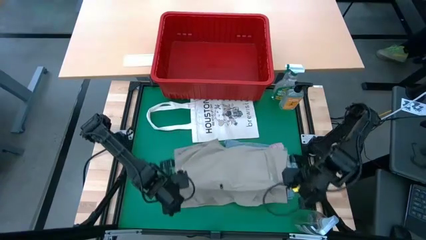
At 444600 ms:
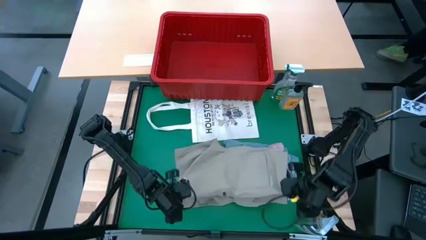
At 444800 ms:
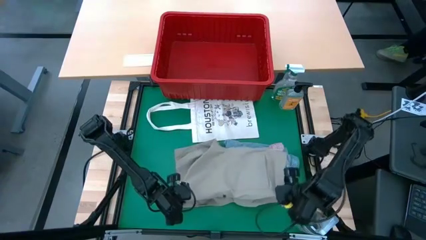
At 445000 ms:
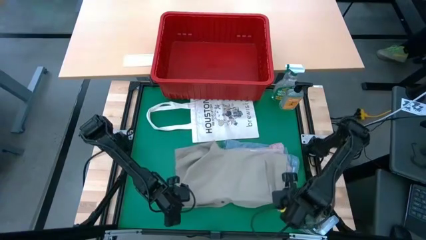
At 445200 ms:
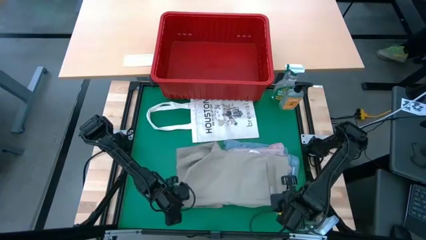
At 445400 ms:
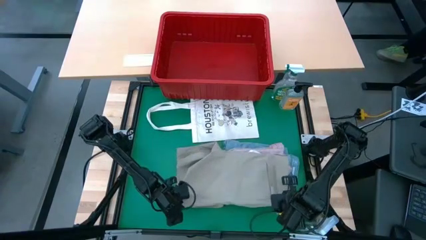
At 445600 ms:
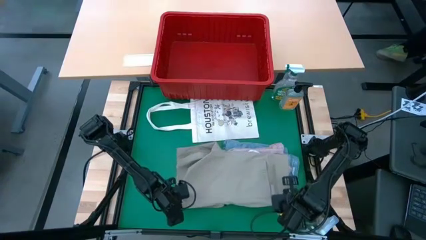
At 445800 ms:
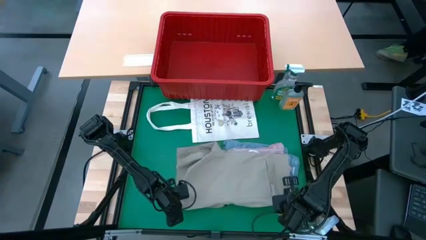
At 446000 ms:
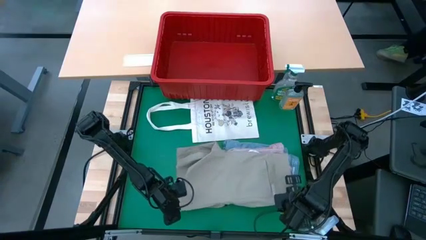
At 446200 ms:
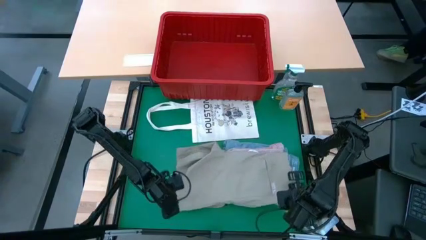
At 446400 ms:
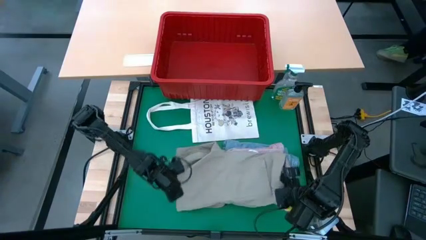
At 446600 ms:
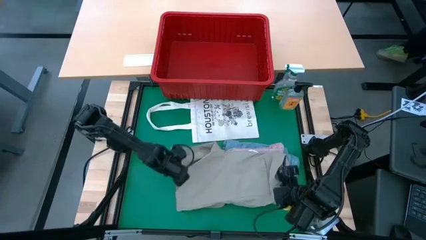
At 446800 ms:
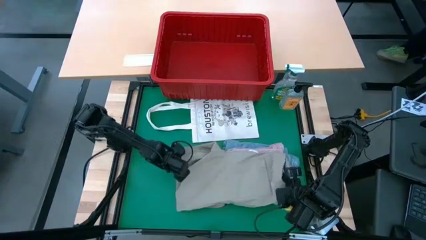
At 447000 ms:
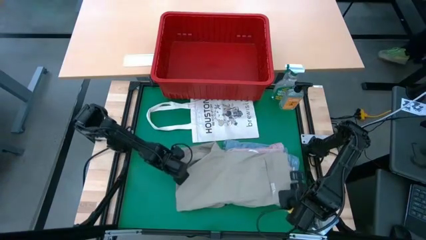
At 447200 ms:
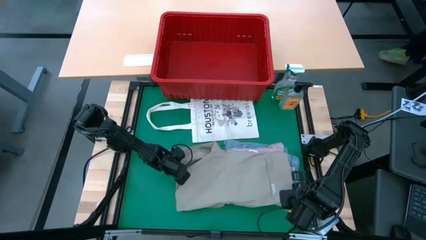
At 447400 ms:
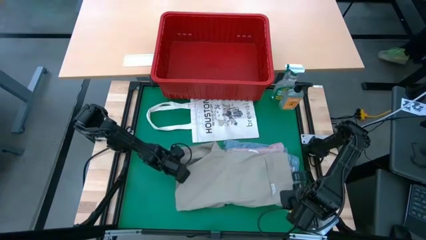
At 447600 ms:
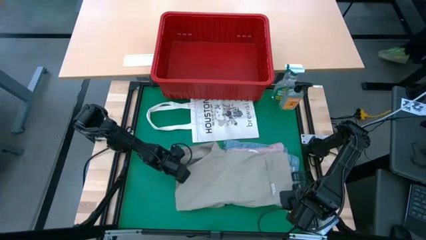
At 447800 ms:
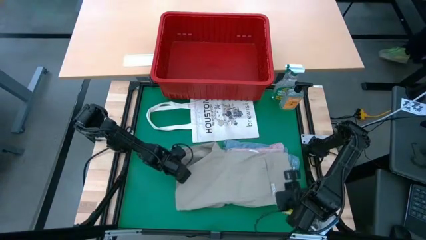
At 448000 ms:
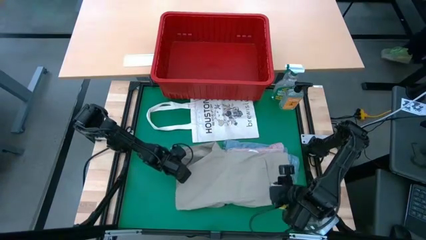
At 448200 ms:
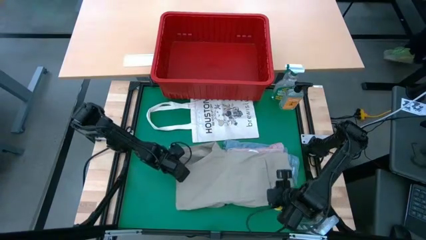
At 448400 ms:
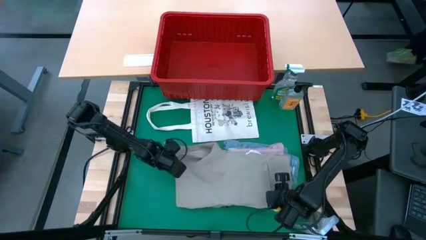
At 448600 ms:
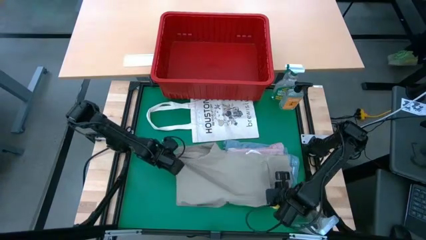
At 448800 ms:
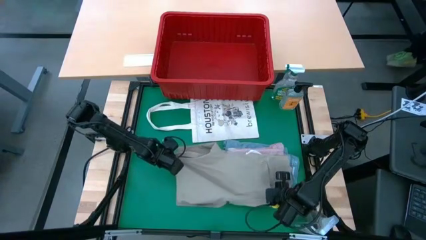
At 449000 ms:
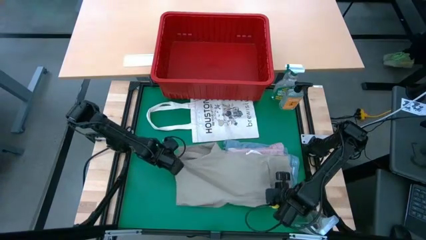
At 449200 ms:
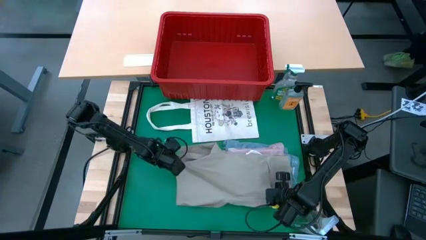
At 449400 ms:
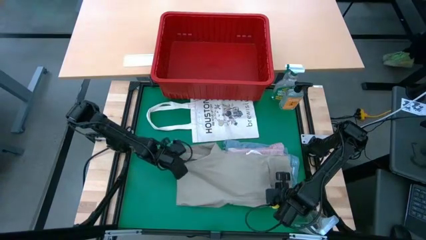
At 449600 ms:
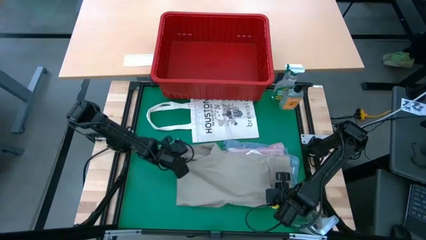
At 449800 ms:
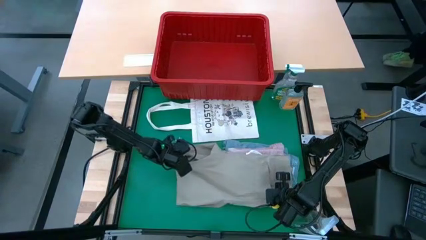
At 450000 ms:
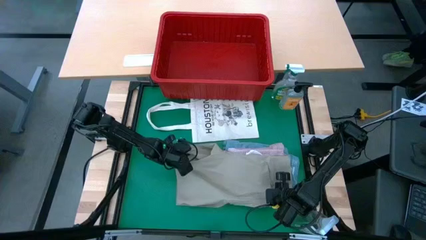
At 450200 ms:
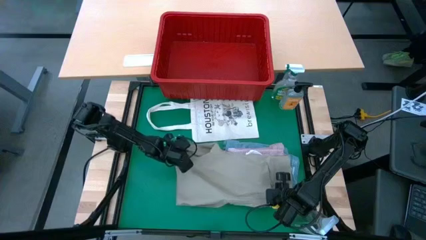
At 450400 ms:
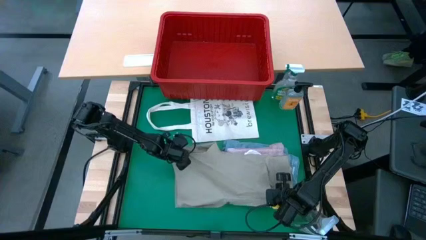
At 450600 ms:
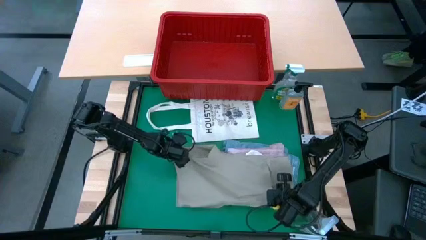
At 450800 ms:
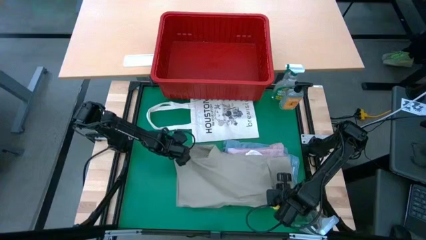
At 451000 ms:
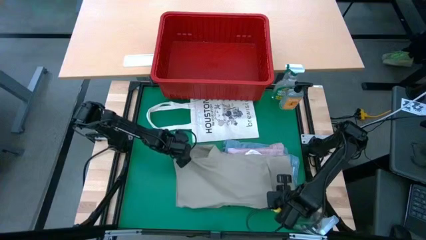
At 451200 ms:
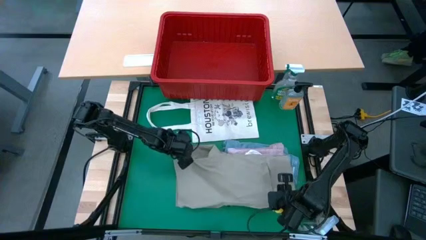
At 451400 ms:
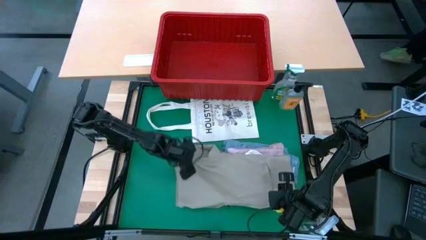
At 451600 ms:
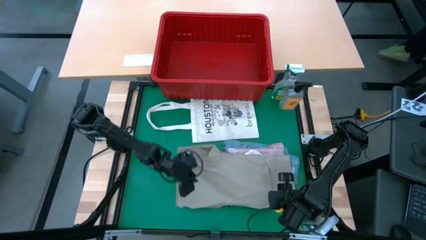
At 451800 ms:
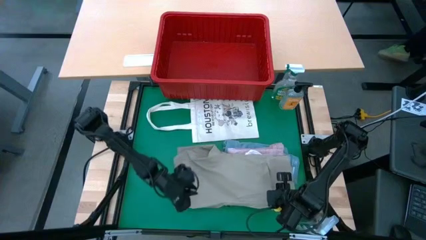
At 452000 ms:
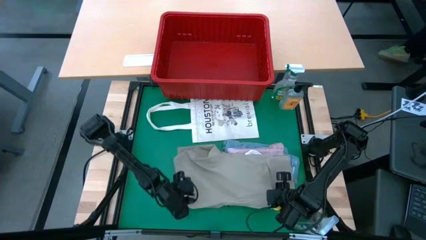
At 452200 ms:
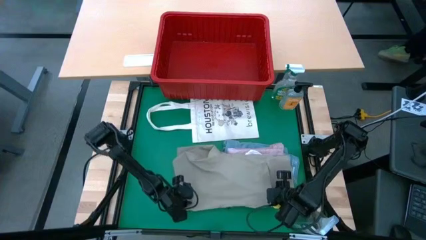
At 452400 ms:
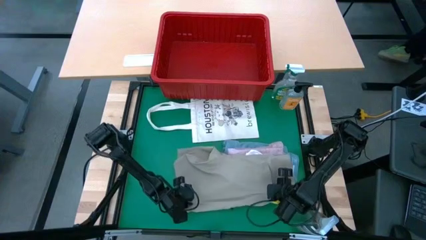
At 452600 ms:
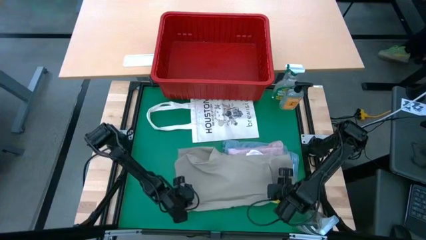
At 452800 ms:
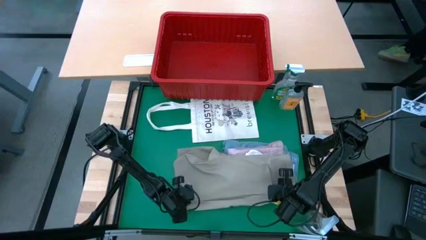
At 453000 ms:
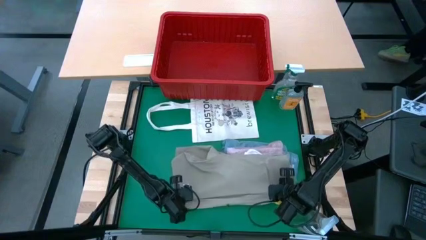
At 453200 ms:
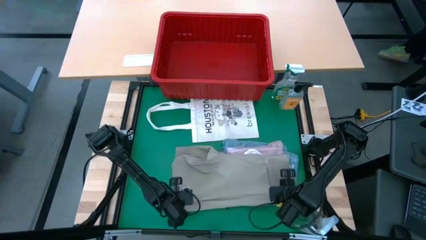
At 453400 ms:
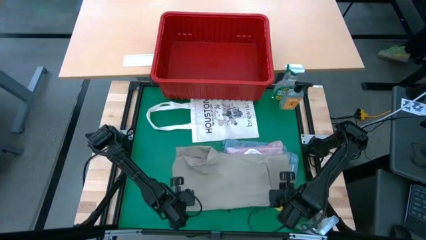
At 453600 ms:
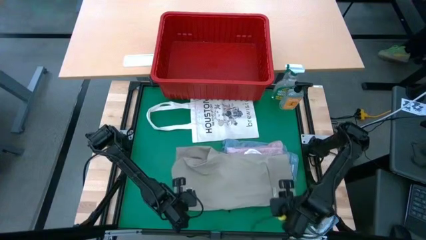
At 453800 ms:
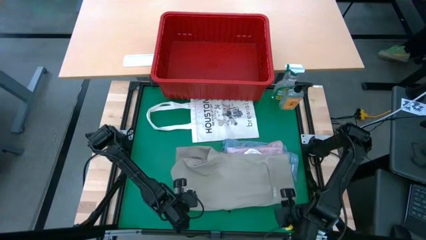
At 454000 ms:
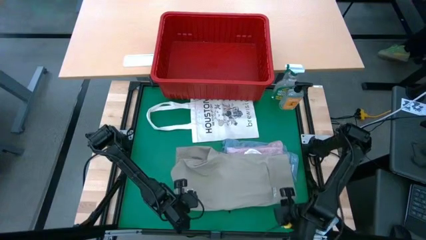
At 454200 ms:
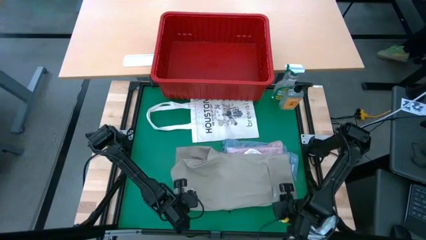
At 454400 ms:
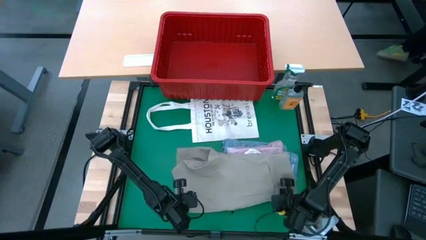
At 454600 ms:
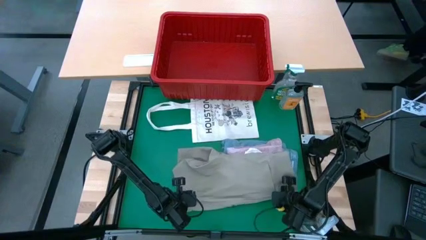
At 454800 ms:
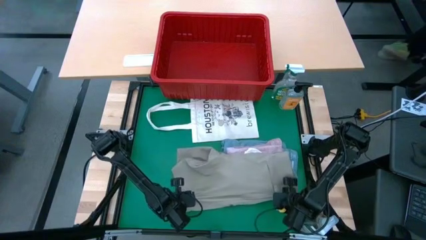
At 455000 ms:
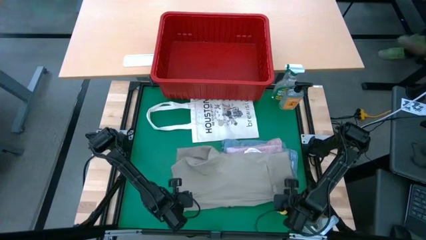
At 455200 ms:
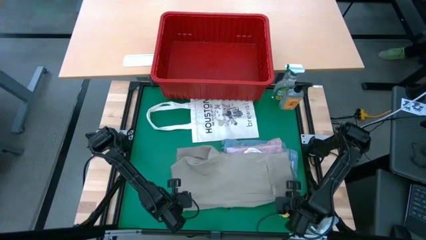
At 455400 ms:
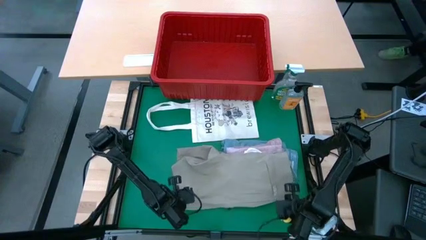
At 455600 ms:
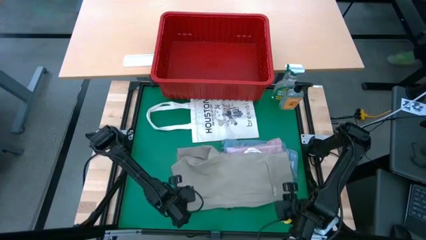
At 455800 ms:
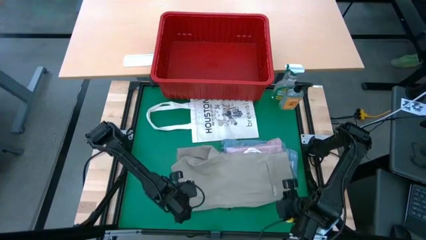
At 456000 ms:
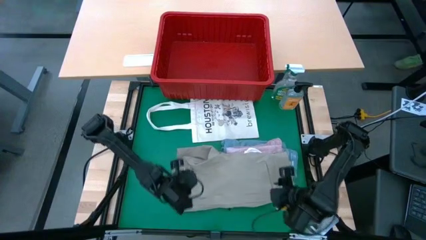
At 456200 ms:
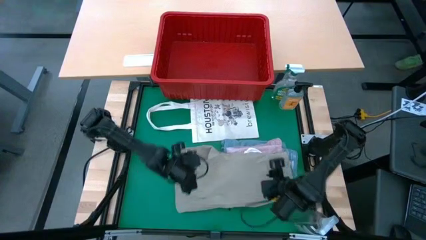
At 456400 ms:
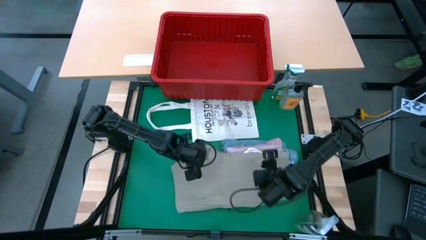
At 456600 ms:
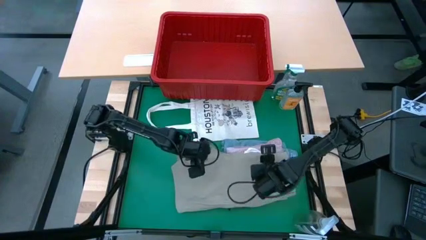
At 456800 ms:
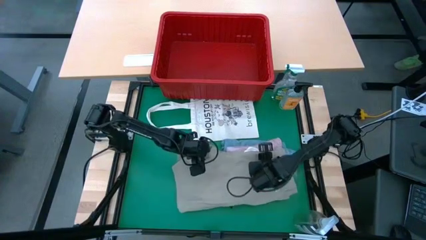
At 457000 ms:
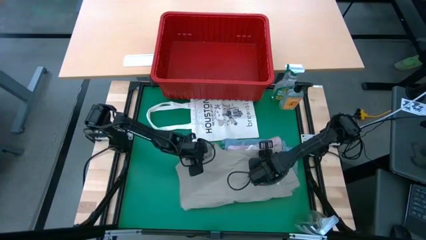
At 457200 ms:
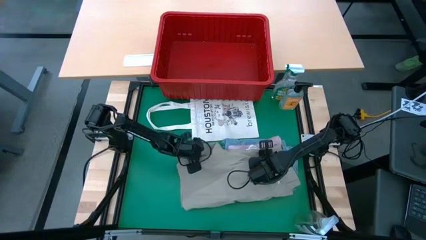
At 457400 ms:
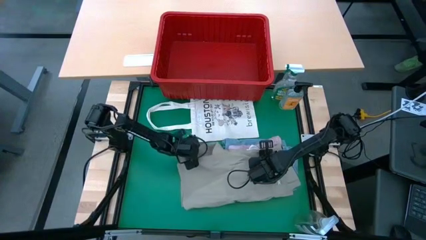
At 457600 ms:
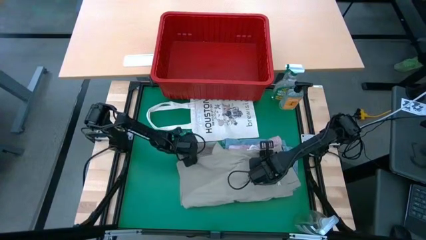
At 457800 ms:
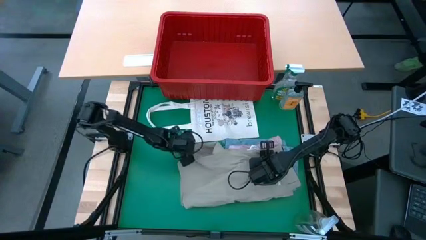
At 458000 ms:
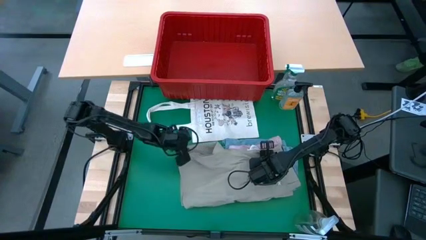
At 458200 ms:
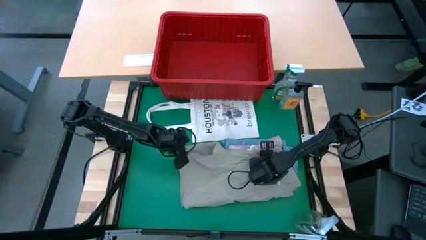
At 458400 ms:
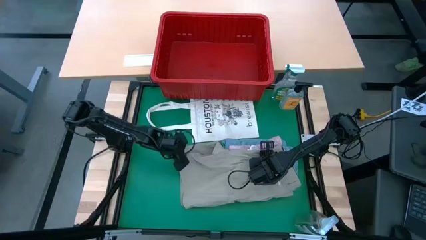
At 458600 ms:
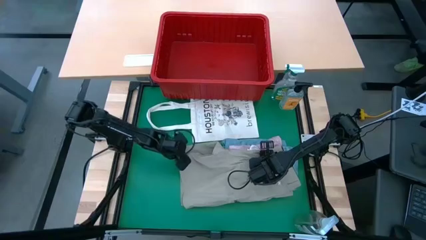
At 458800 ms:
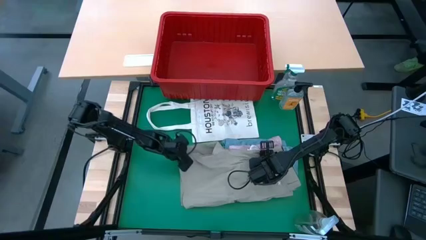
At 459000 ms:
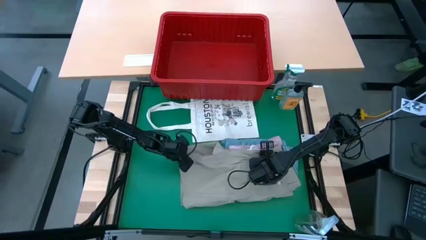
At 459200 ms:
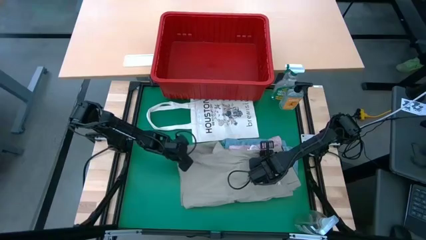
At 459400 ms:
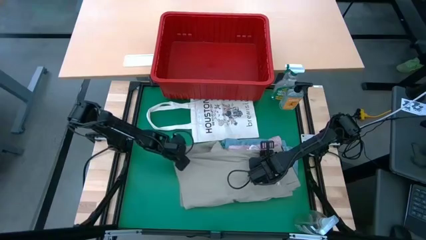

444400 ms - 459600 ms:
Task: Fold Laundry from Bin
Fold the light brown shorts from the red laundry basket
